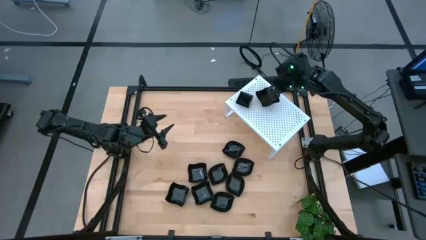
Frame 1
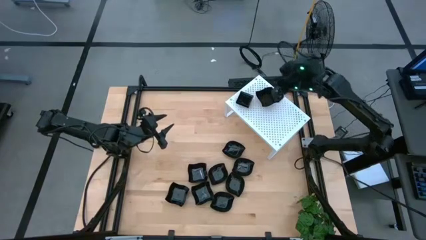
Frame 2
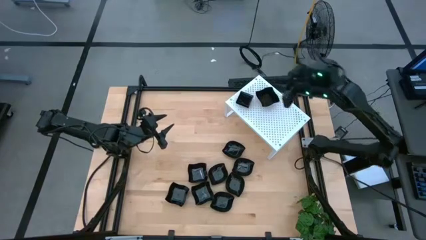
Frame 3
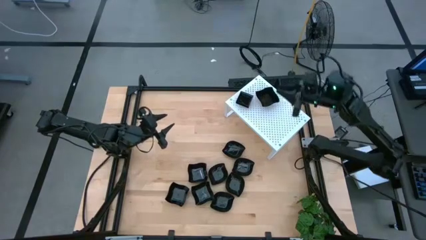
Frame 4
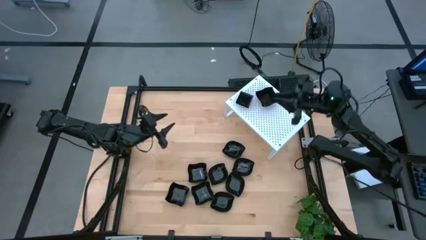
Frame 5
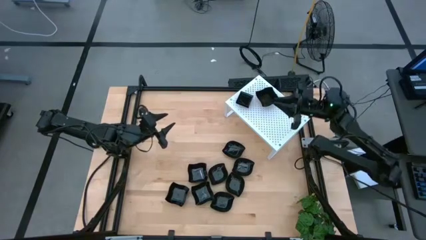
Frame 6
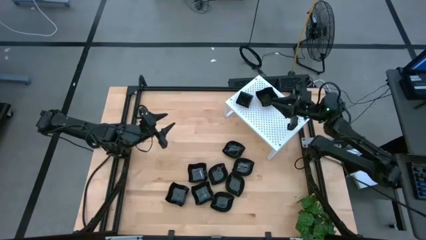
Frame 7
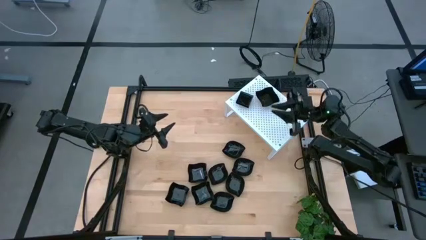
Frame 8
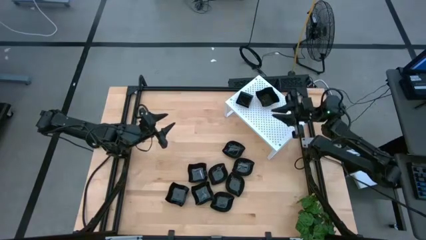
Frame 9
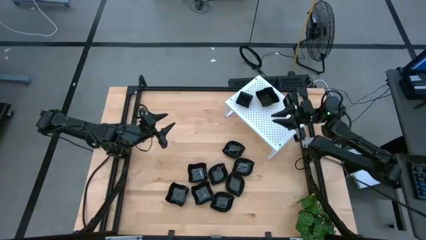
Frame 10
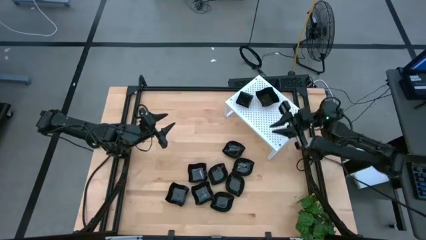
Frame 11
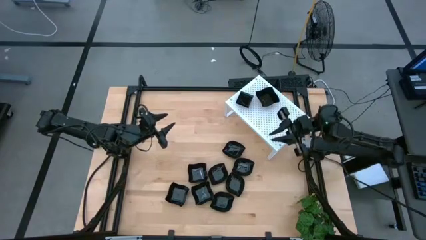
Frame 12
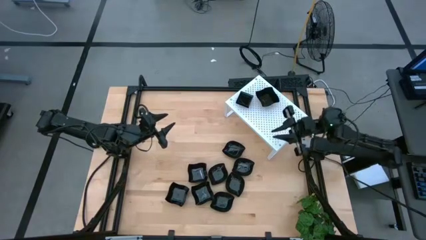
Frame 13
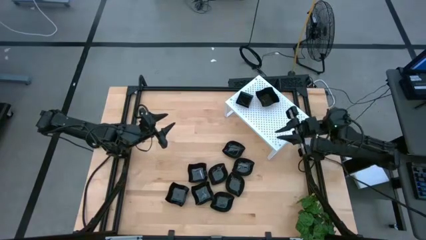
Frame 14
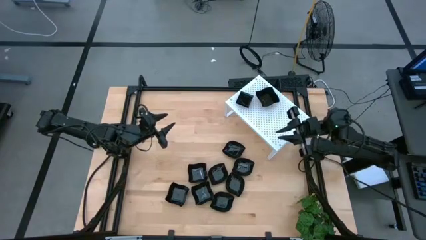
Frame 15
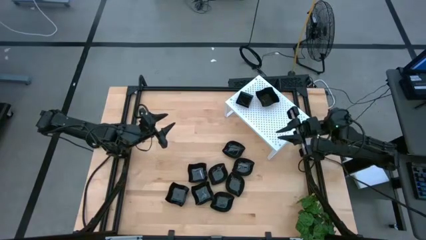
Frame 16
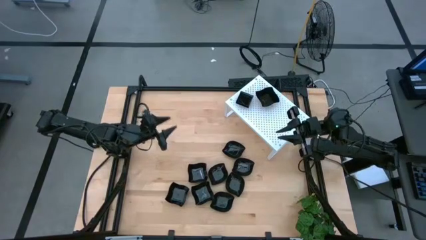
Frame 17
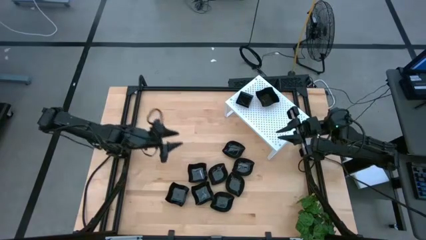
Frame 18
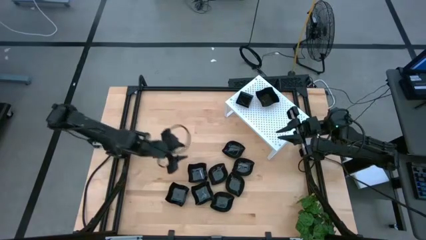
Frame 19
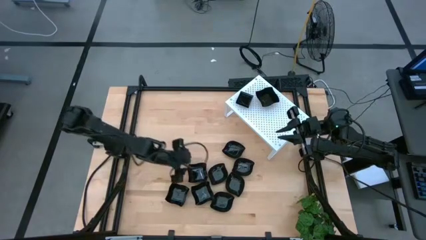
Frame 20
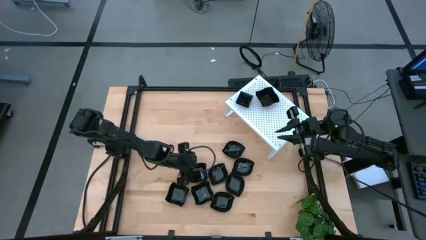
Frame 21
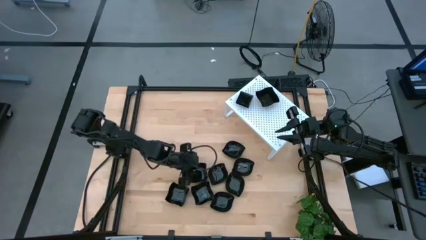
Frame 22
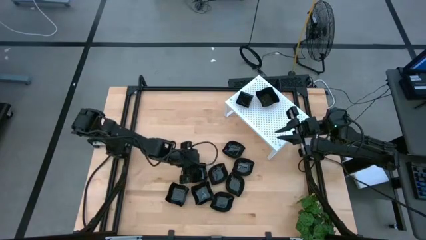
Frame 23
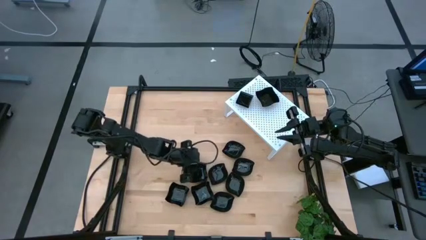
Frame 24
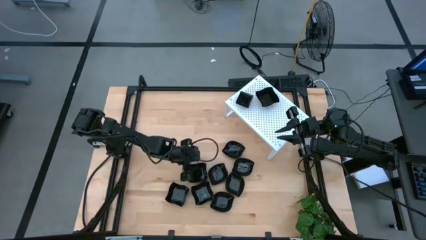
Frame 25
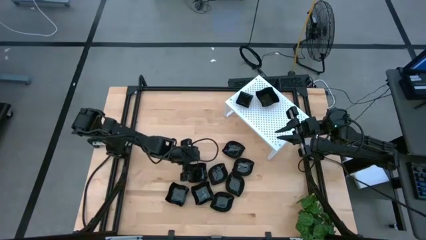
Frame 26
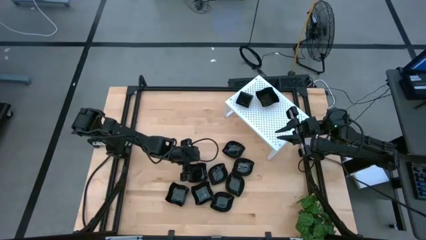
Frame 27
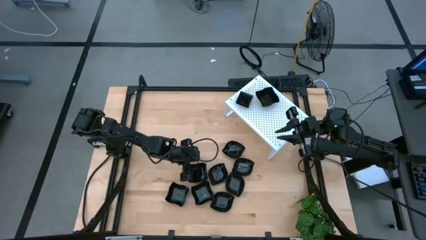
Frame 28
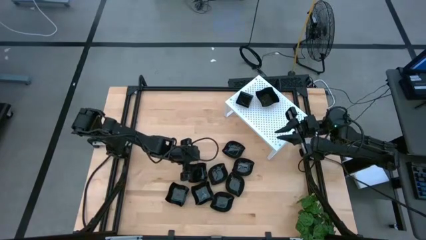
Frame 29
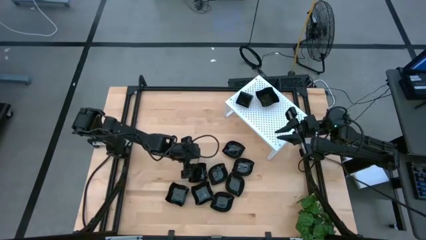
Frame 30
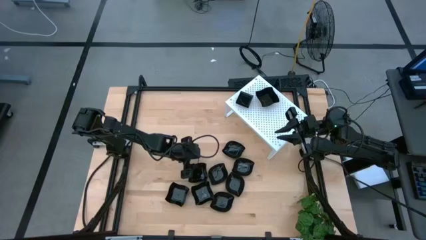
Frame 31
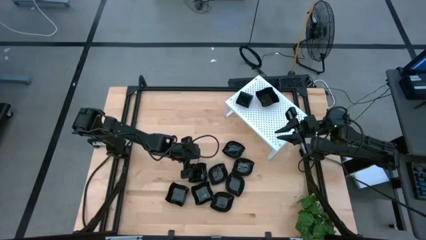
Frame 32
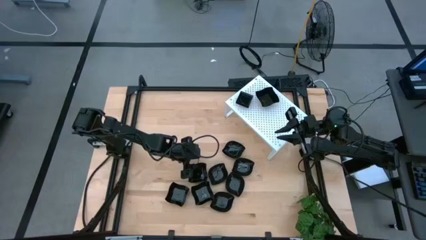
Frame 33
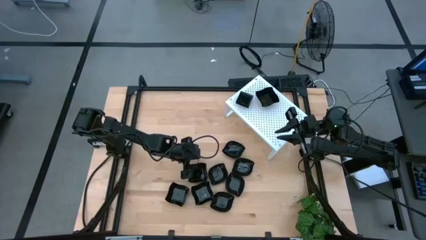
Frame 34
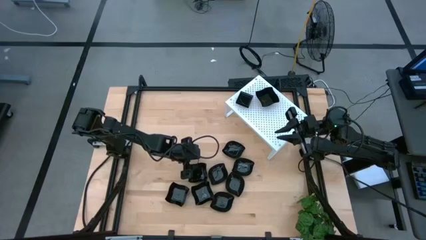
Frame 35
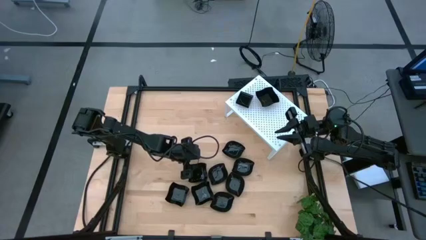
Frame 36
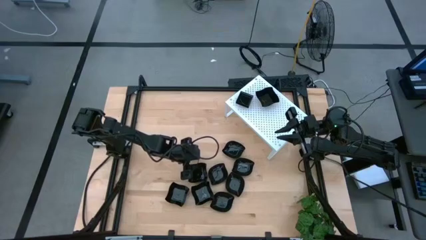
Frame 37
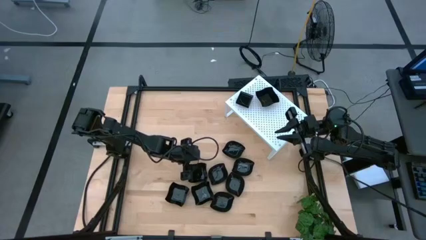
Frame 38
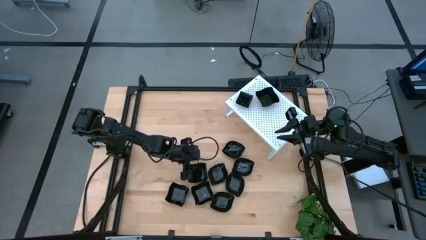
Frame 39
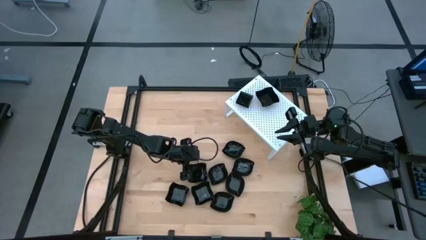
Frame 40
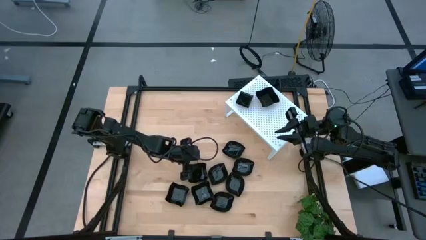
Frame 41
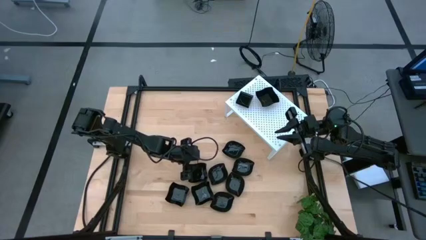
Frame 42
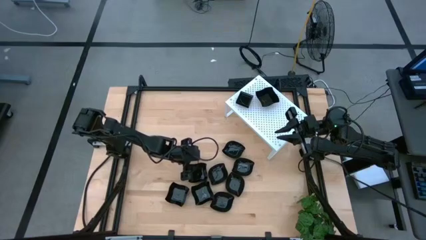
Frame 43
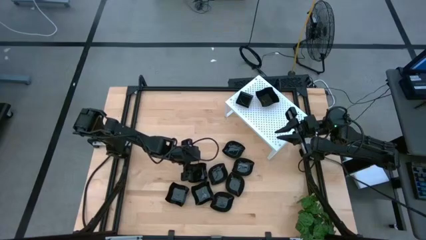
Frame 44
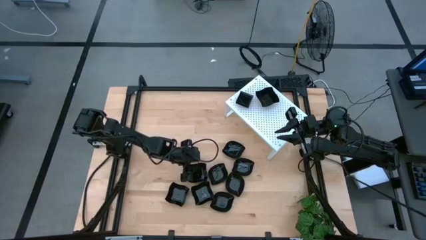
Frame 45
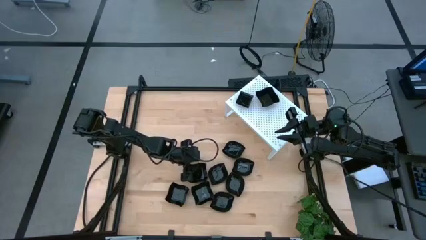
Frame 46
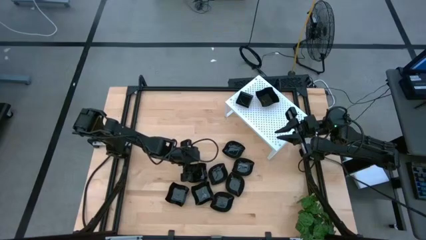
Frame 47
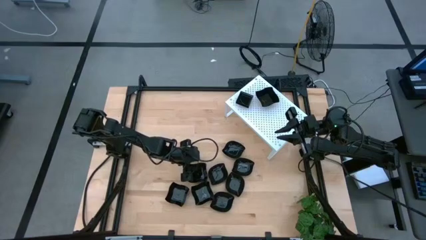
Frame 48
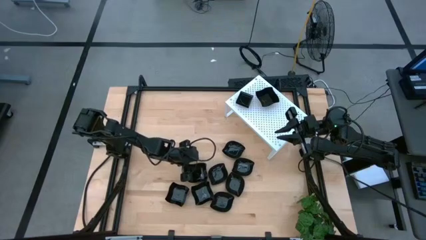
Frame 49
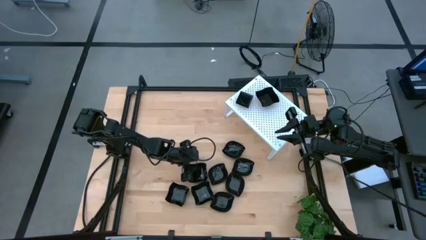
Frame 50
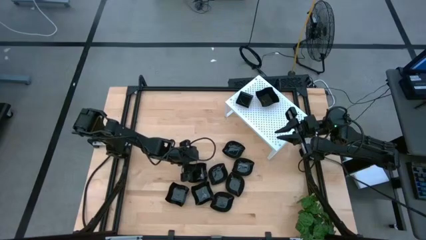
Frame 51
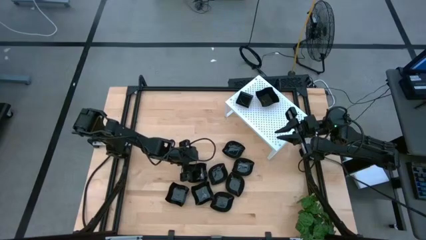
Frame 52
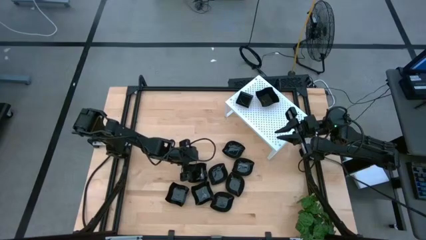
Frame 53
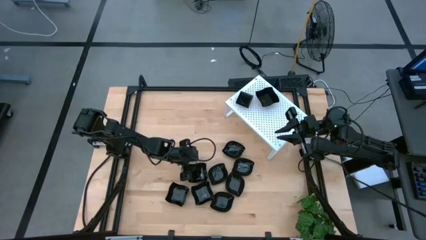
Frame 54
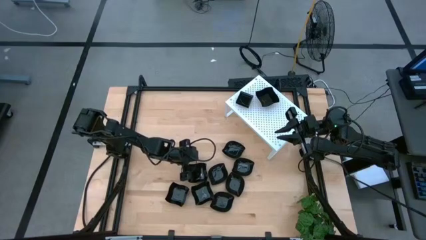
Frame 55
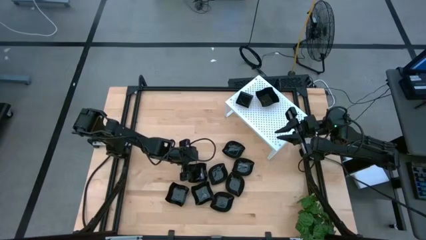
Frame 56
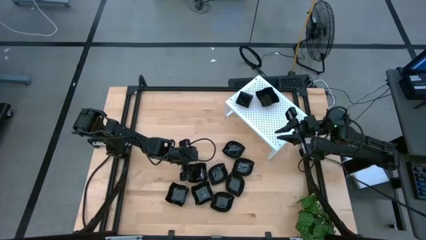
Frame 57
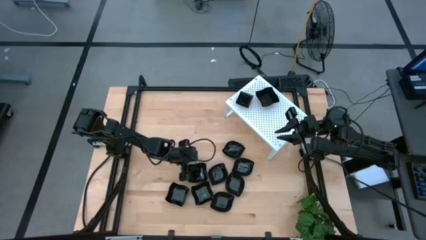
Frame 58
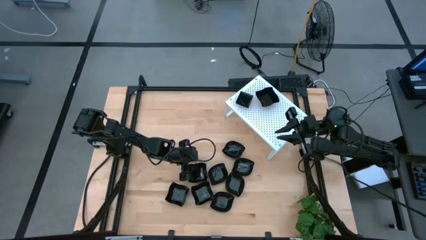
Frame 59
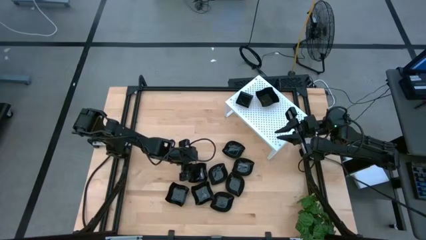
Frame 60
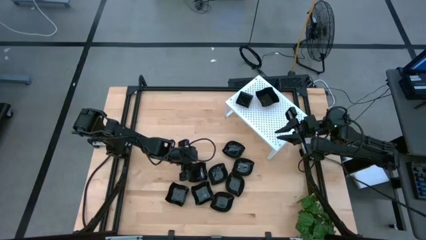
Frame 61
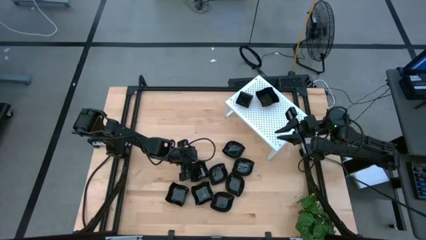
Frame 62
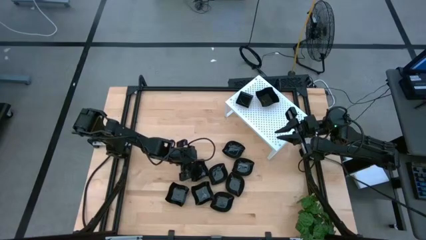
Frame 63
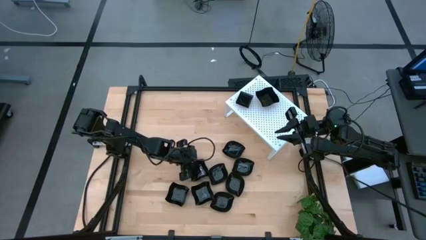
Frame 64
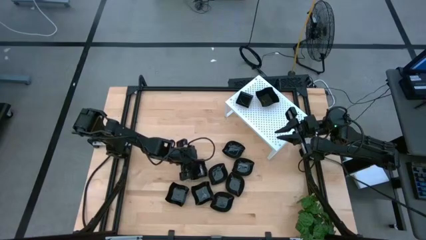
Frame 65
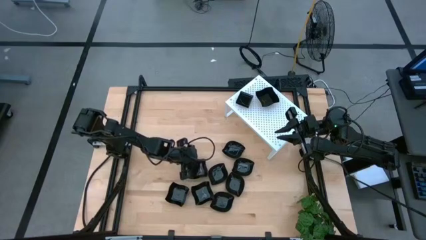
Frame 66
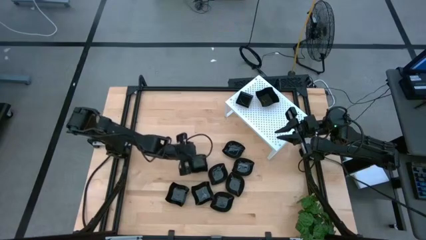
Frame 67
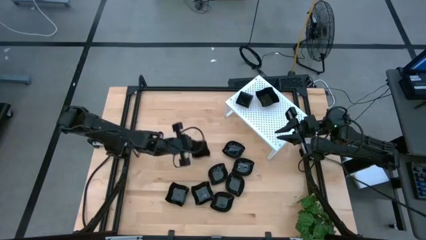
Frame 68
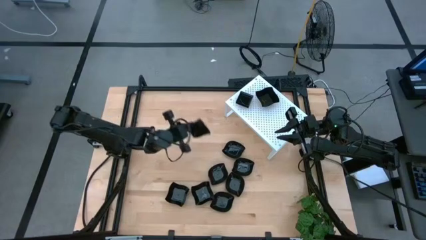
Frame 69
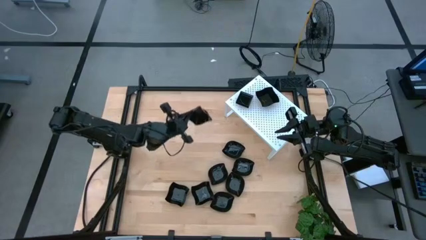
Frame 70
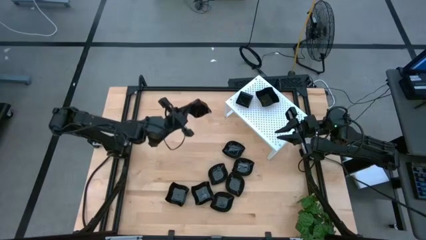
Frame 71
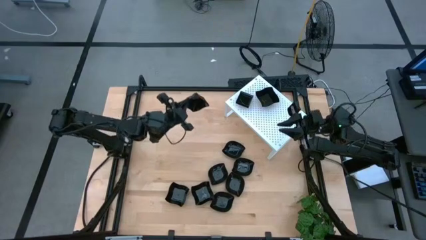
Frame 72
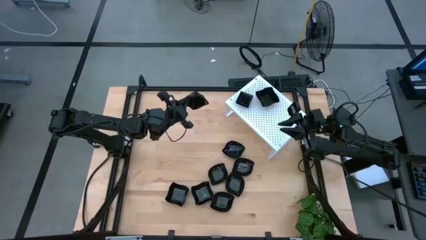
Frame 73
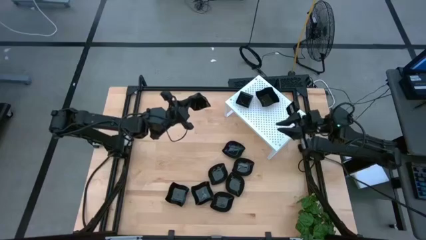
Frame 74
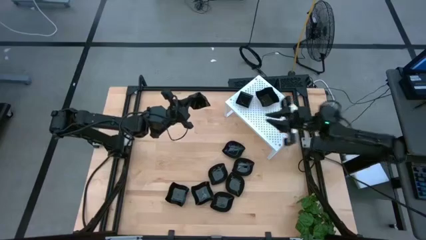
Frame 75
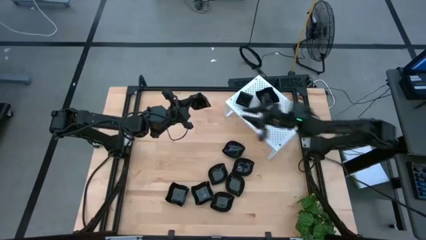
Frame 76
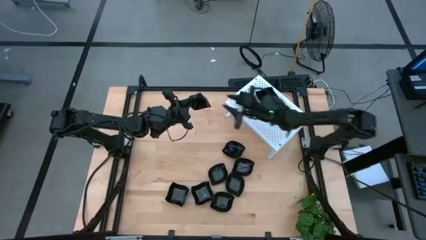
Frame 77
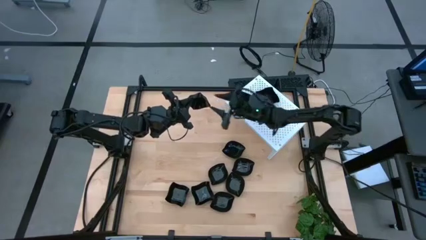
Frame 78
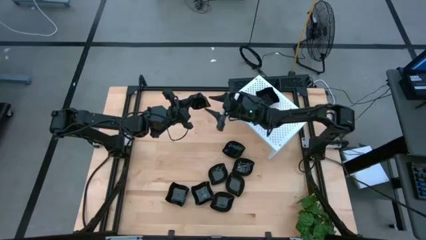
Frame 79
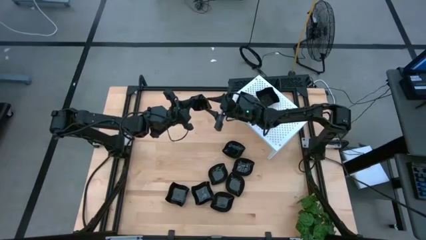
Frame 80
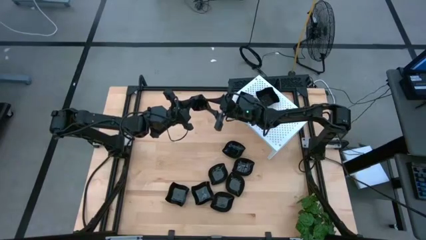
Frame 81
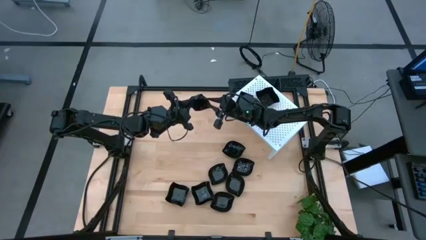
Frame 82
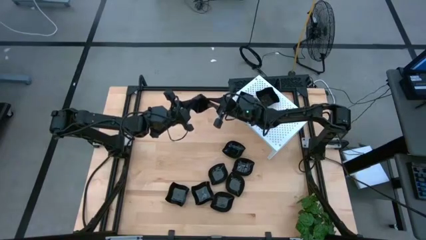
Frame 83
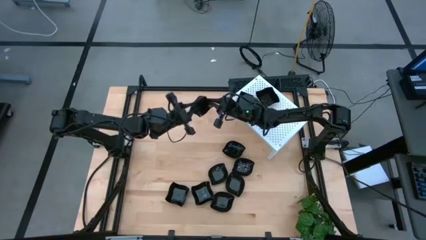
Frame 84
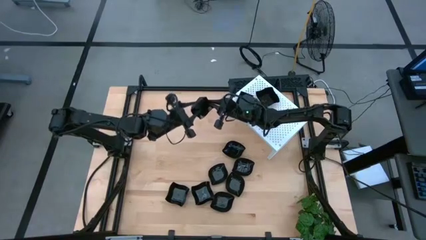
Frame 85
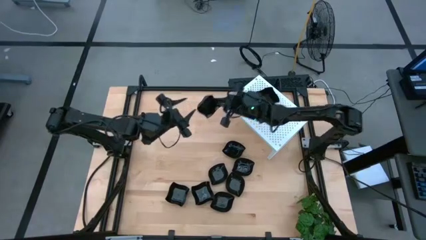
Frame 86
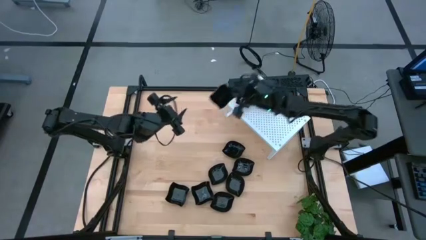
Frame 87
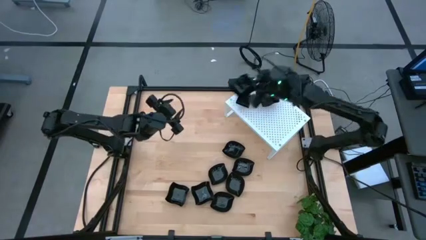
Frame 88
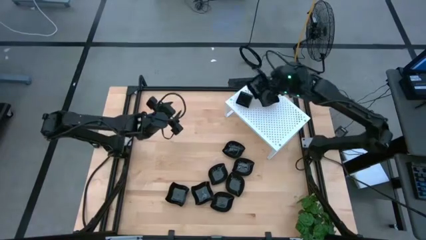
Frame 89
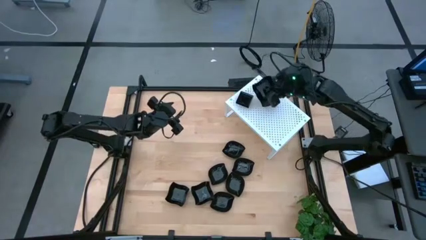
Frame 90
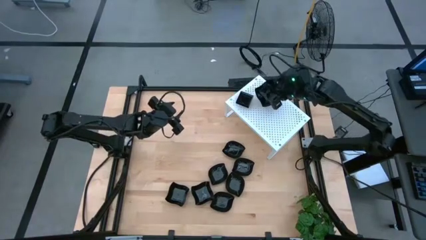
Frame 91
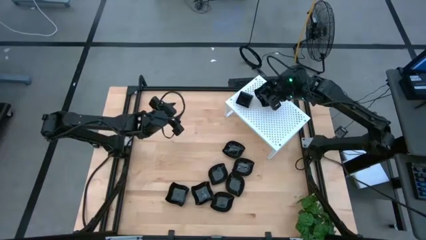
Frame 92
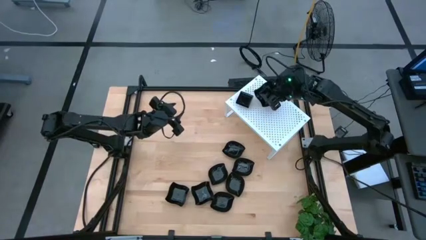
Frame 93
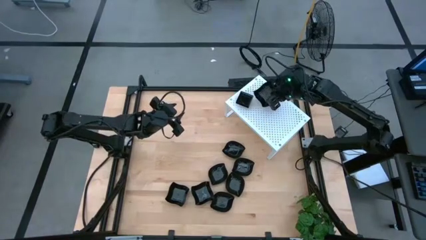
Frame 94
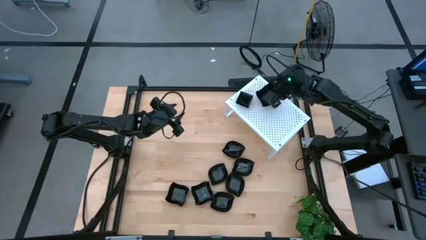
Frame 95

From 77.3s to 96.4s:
Task: Pick & Place Mini shaped plates
Stack the distorted square plate on top of the other distorted square plates on the shelf
